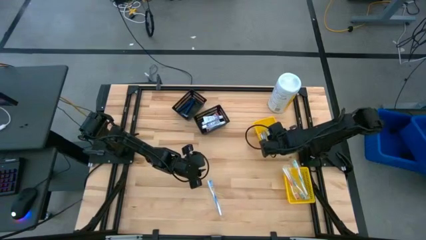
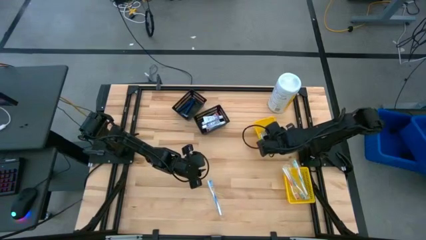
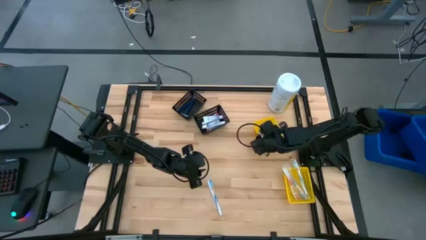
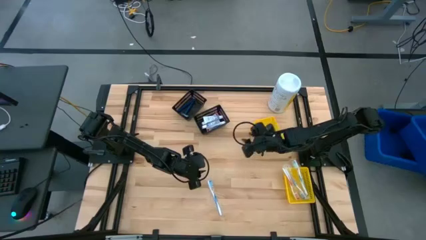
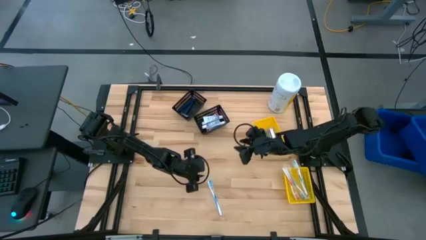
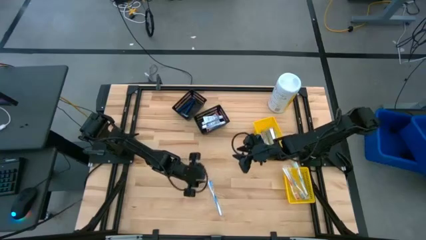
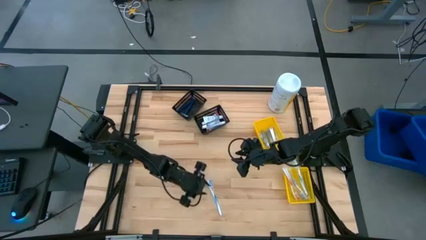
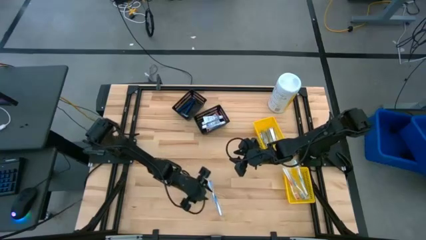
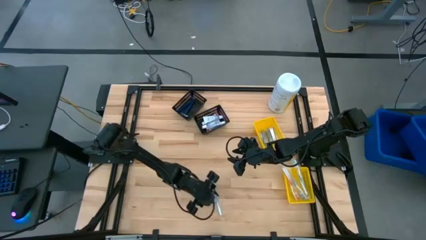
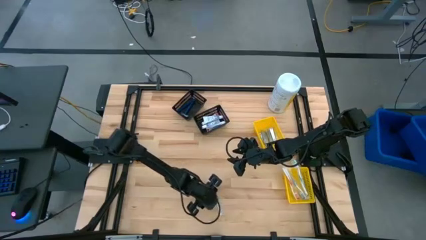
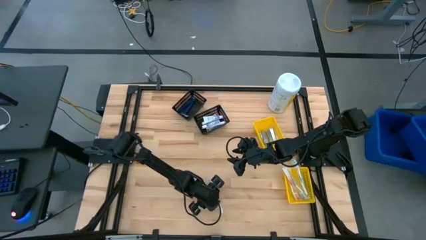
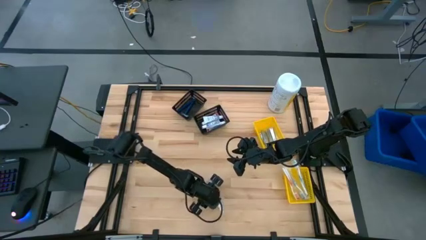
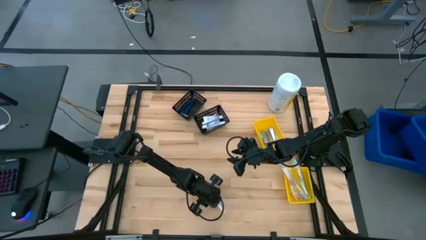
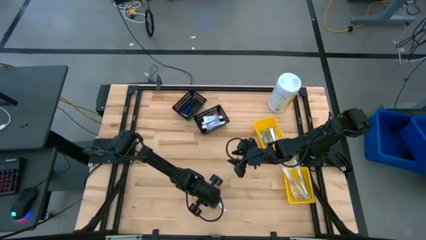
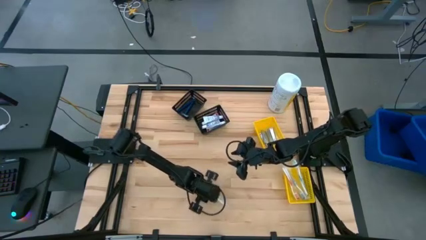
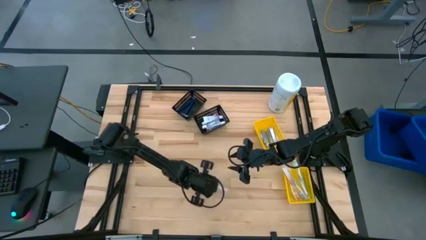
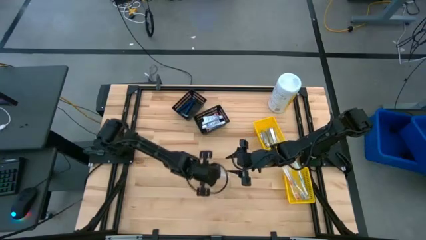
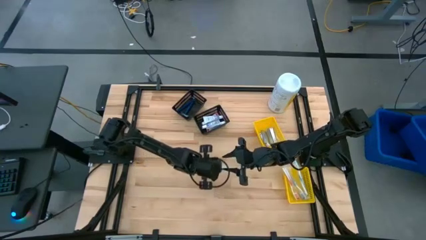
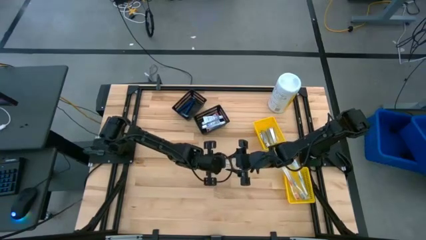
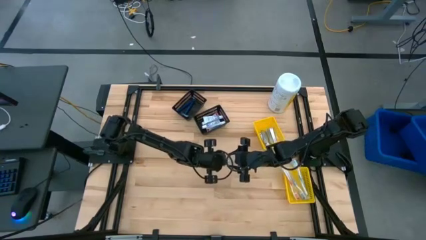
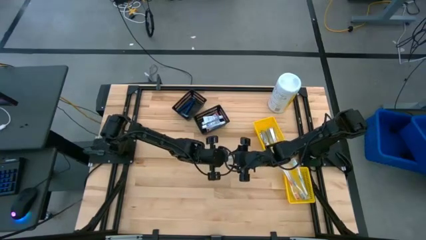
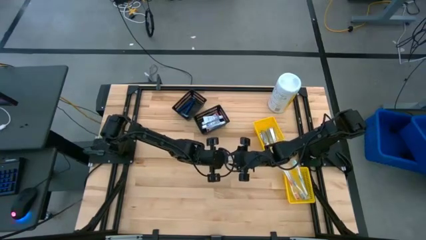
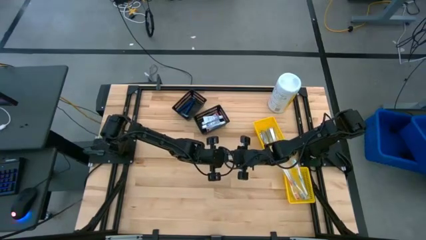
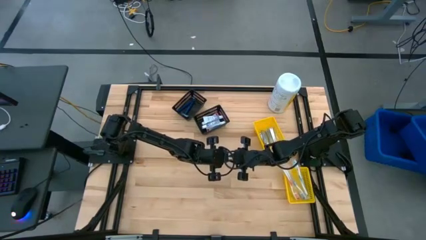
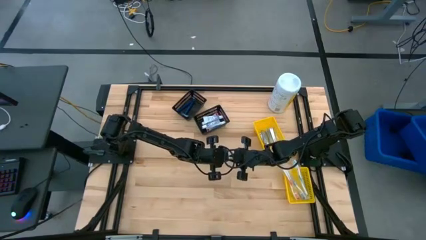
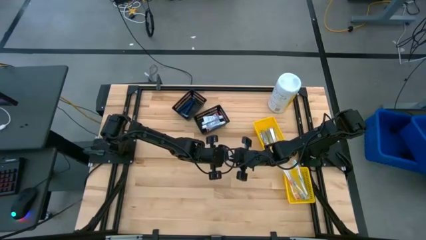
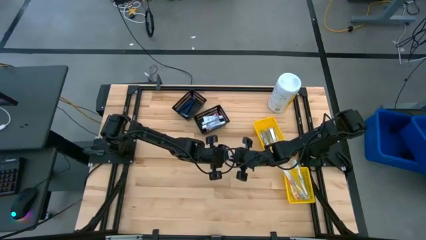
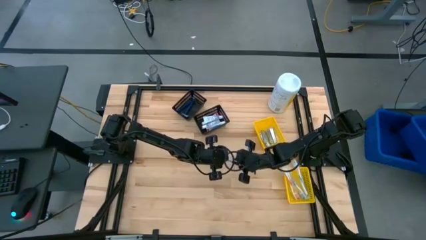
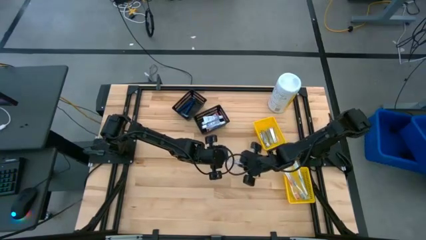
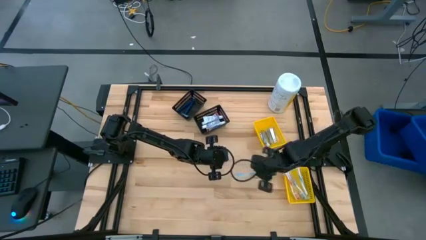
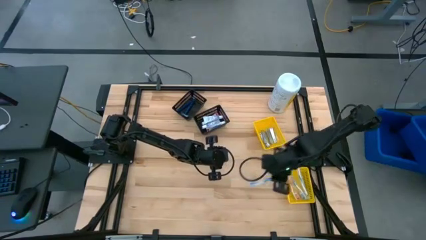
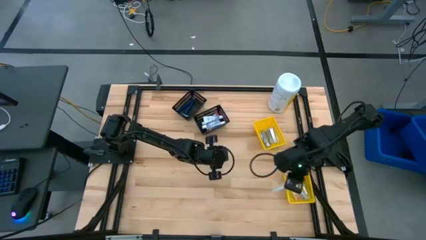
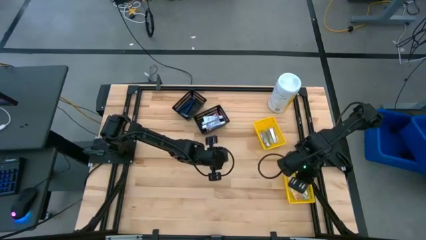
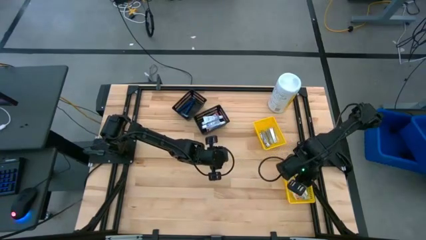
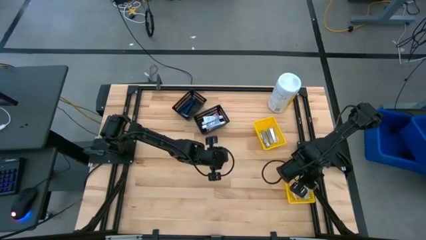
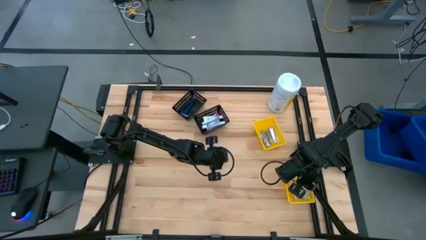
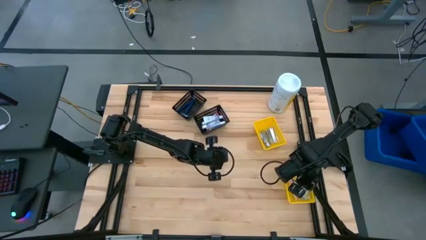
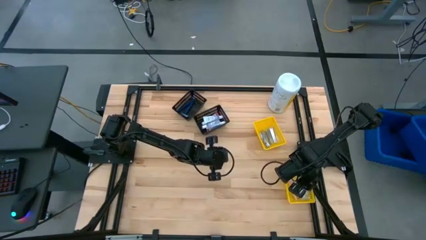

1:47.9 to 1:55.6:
Task: Pick & Place Travel size toiletries
Put the blue toothbrush into the bottom yellow bin

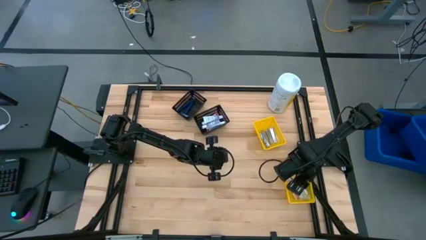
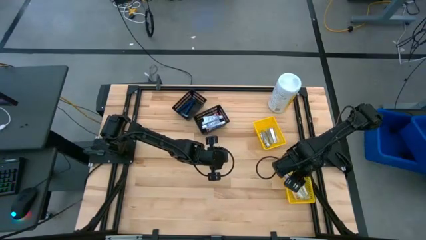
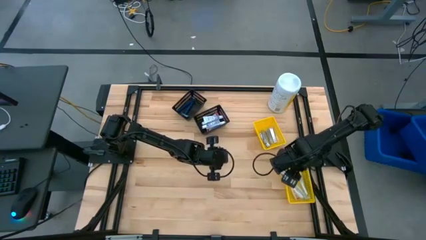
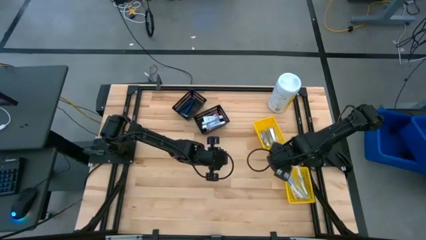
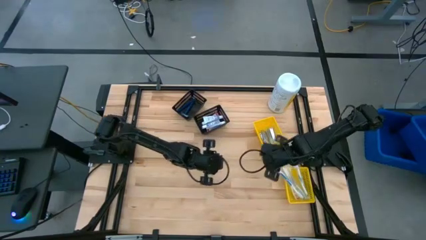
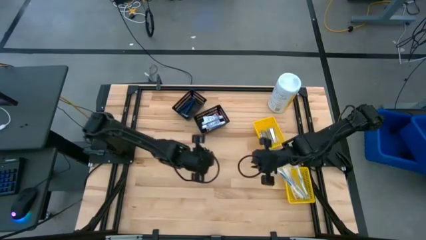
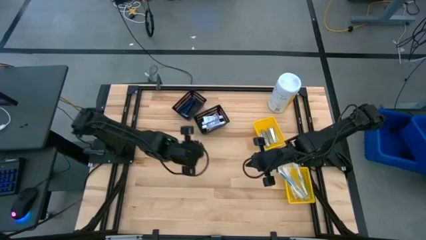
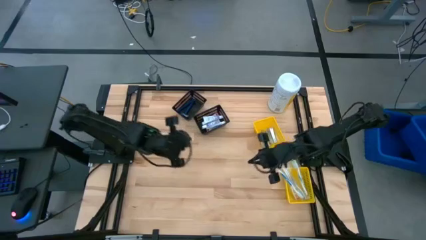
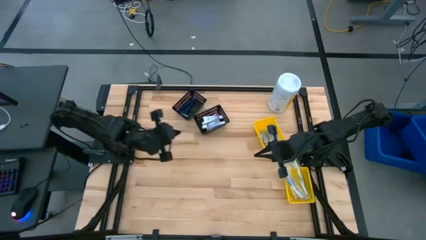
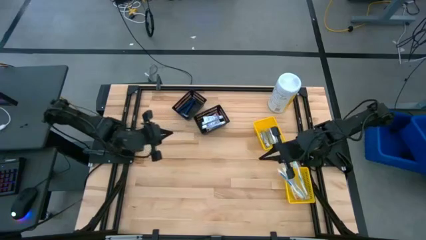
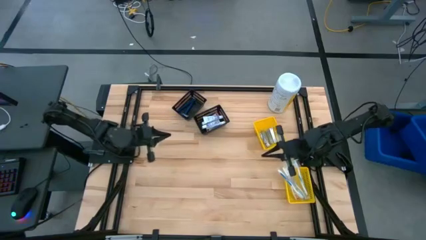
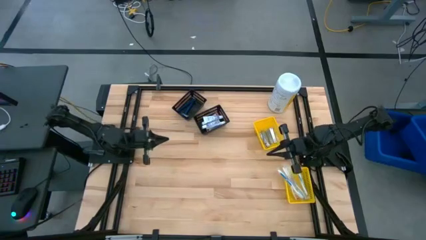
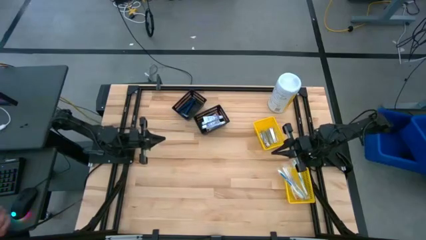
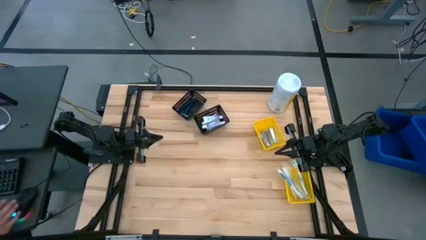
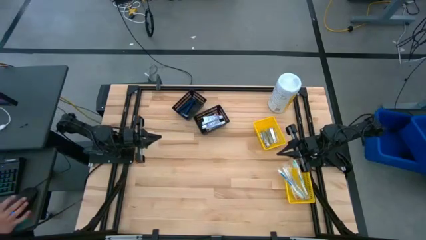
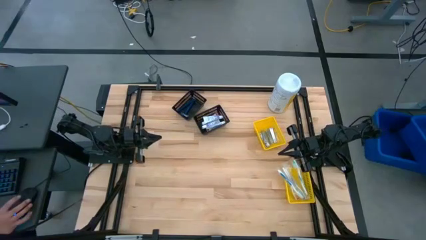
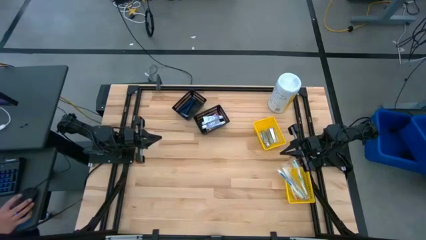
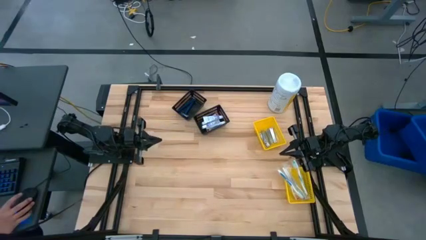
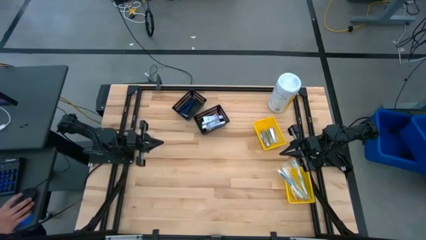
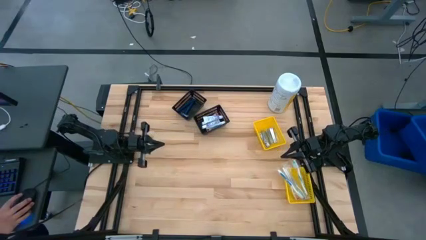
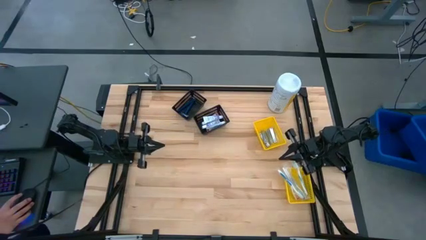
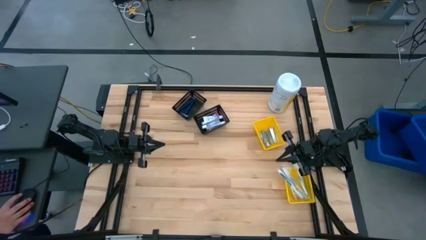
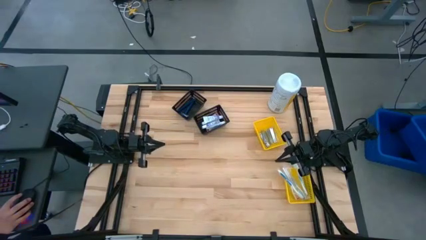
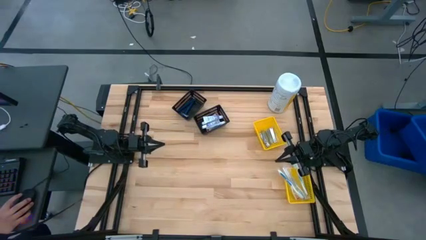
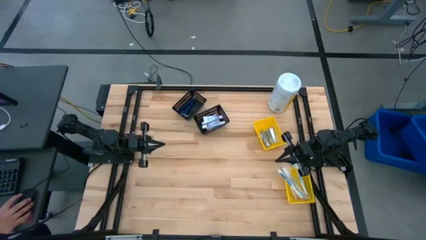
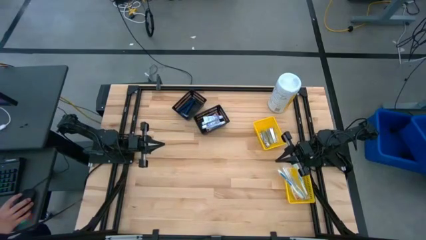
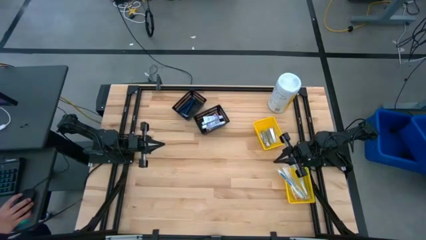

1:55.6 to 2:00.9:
Return to Home Position
